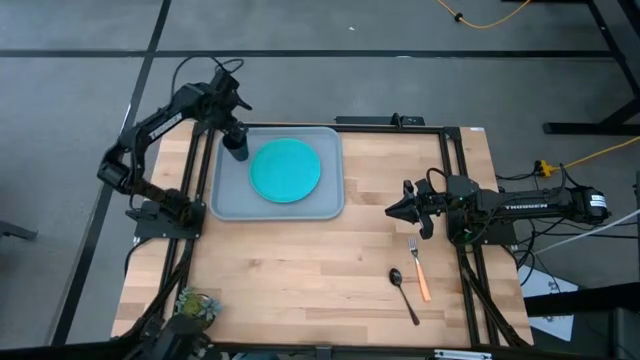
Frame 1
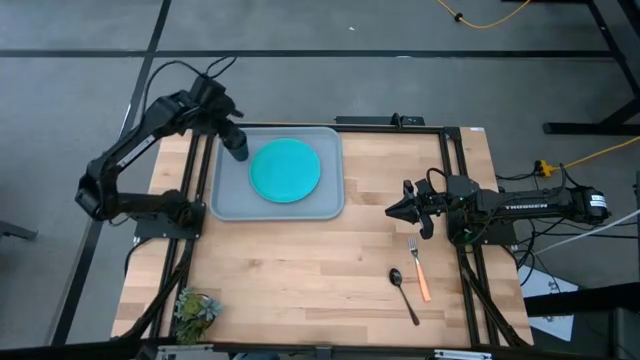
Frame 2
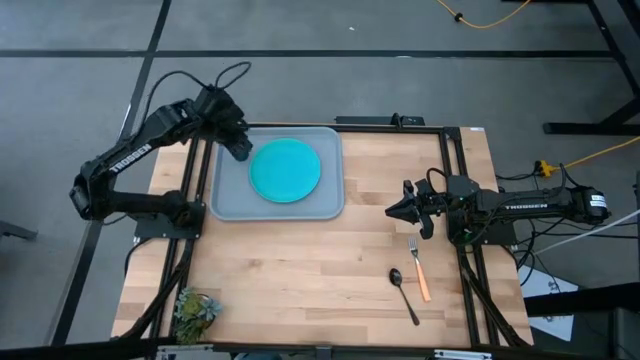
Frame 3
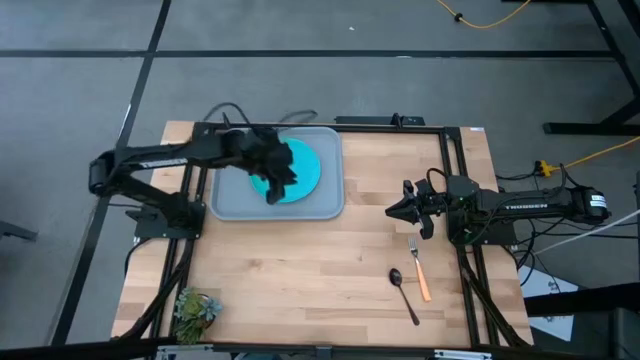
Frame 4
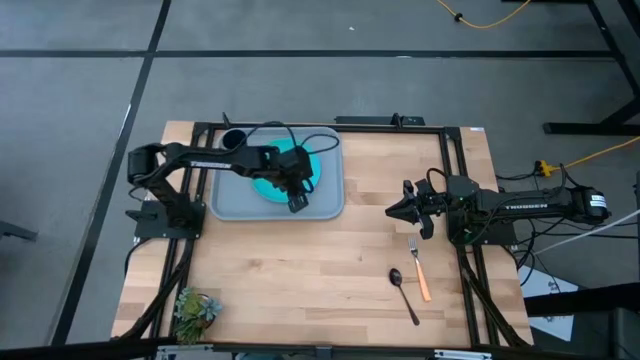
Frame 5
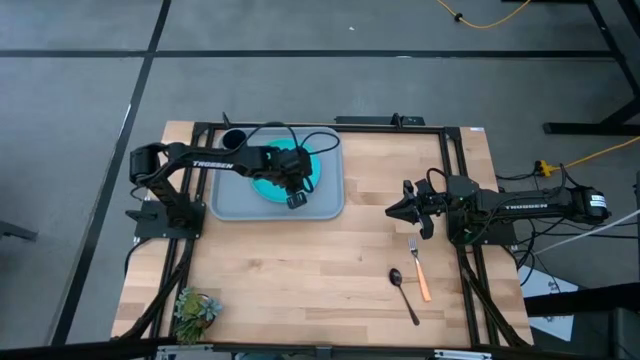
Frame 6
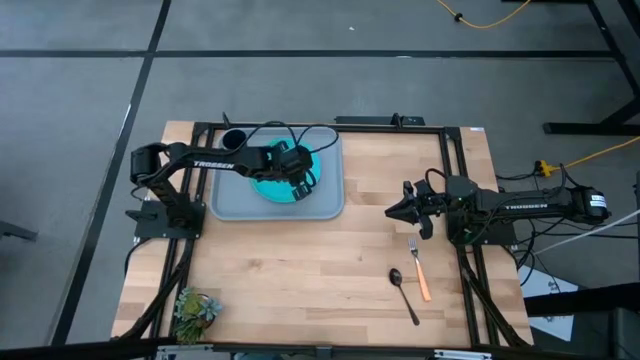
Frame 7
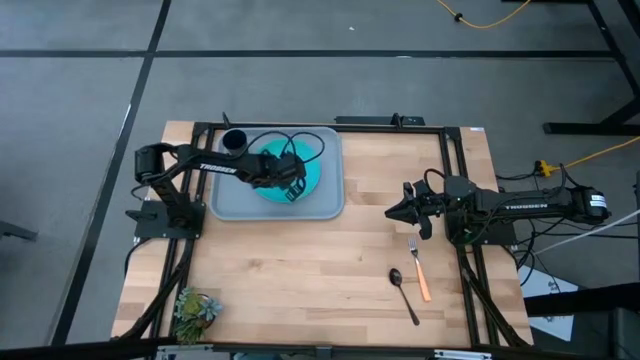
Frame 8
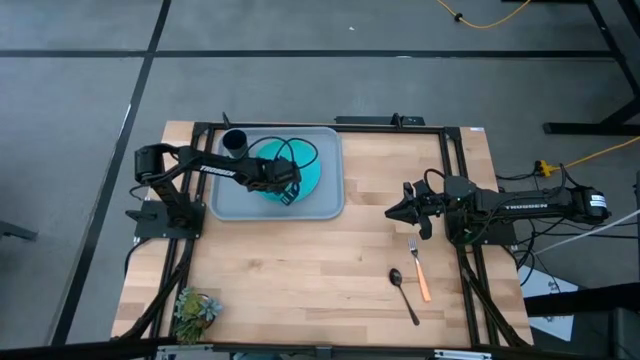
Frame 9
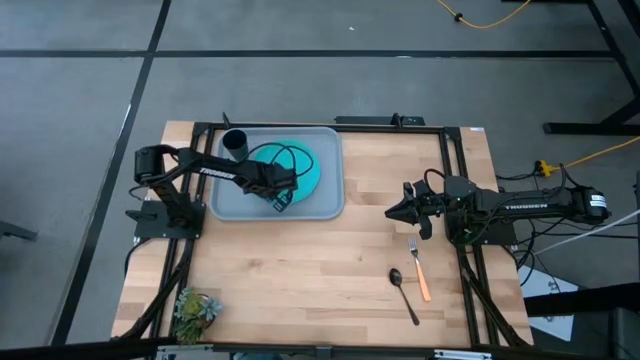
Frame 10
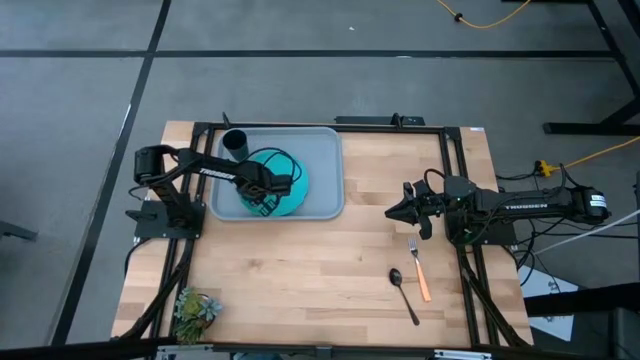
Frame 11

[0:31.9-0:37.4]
Task: Pick and place plate/cup/fork/spoon on tray
Adjust the light blue plate on the serving tray

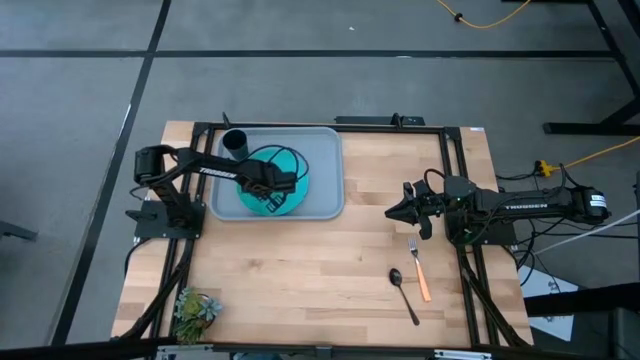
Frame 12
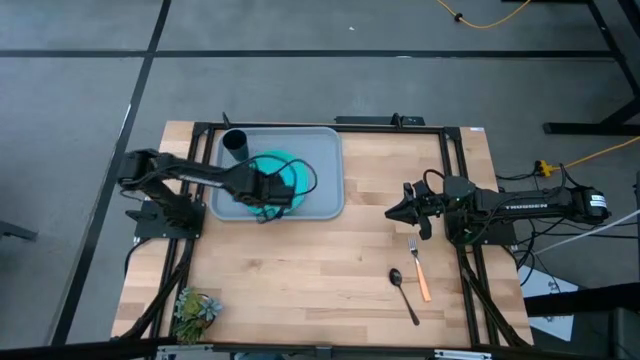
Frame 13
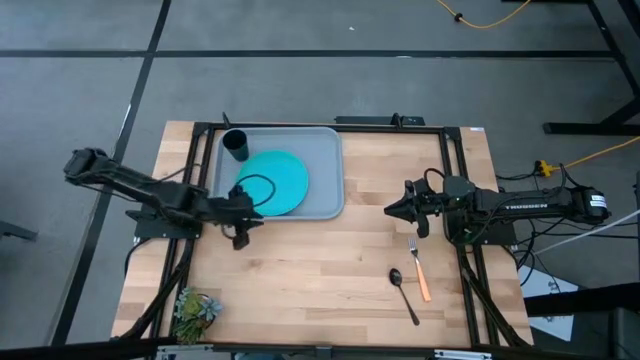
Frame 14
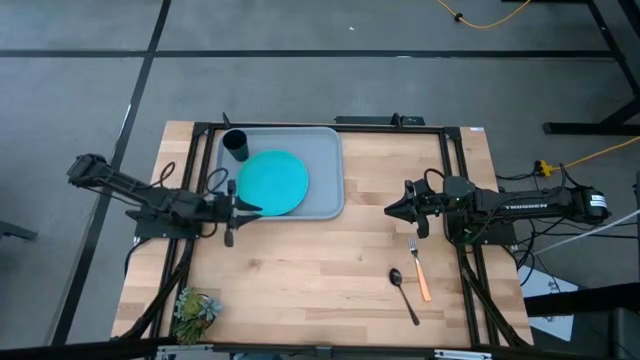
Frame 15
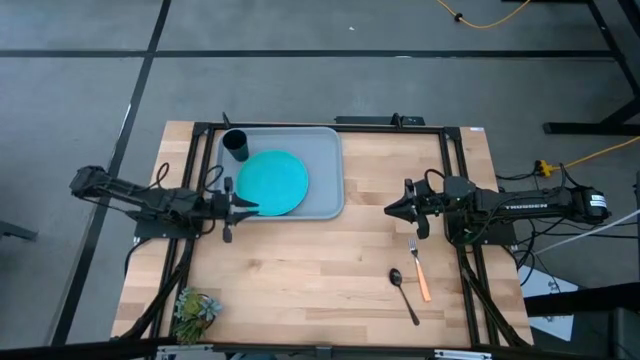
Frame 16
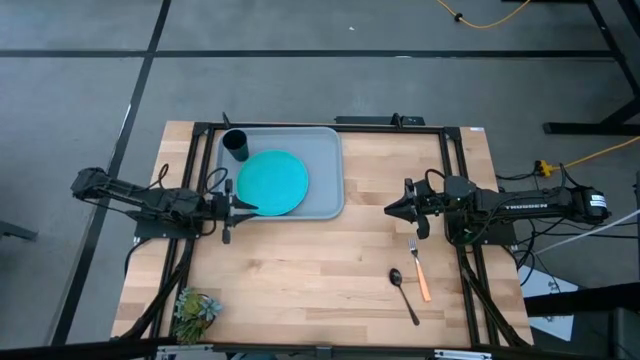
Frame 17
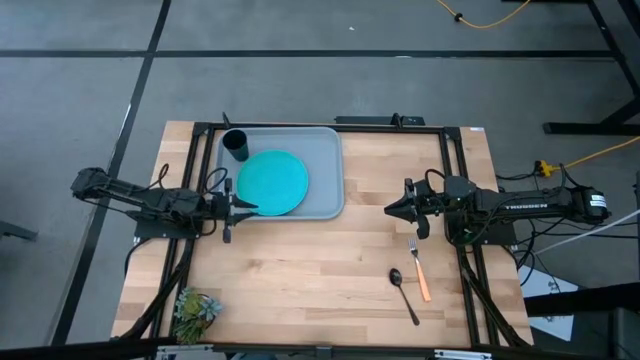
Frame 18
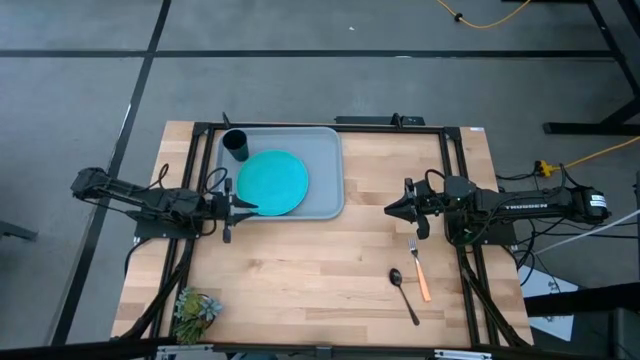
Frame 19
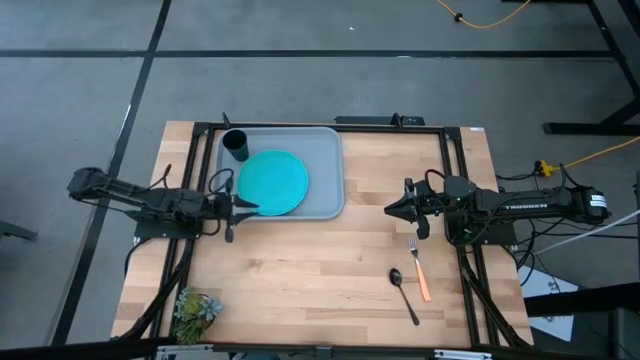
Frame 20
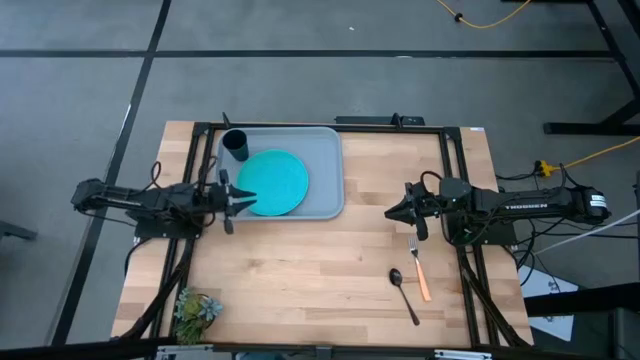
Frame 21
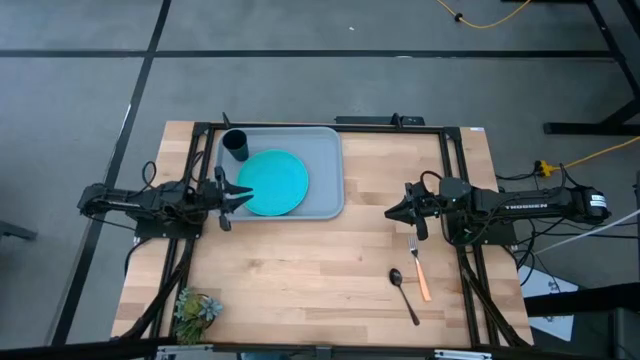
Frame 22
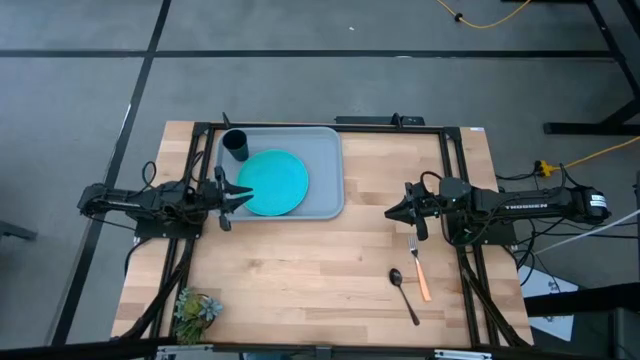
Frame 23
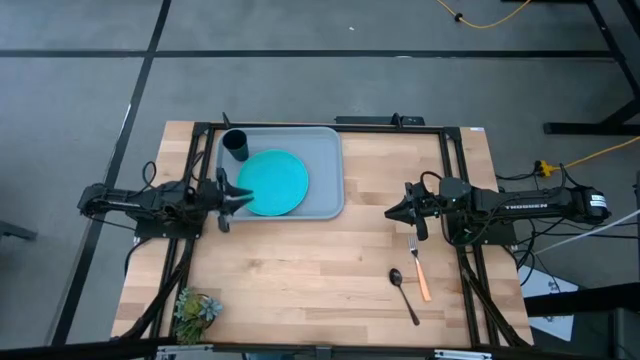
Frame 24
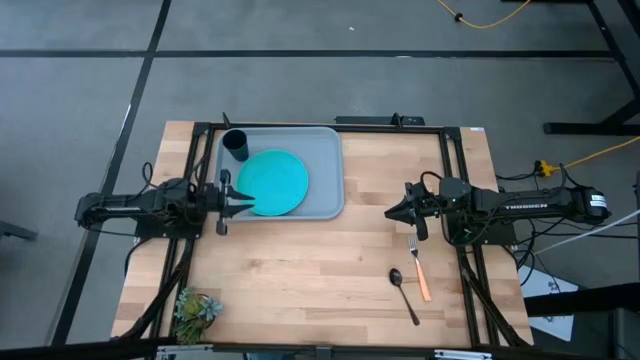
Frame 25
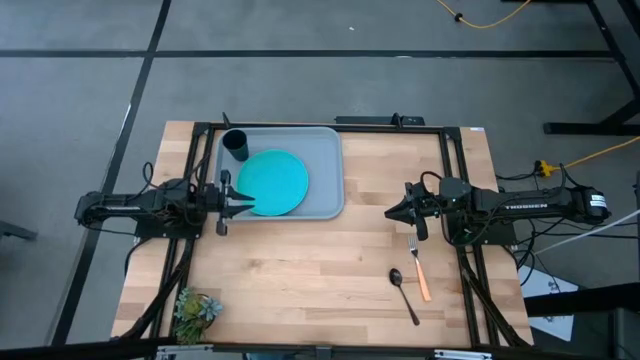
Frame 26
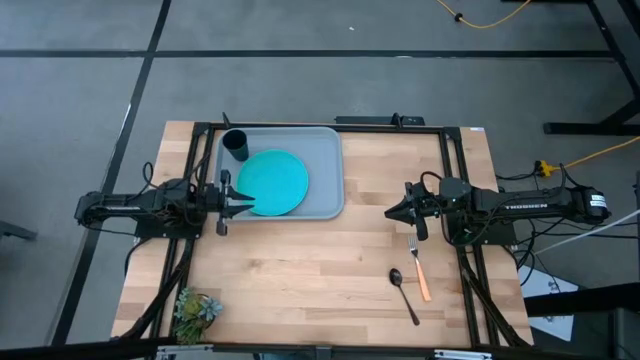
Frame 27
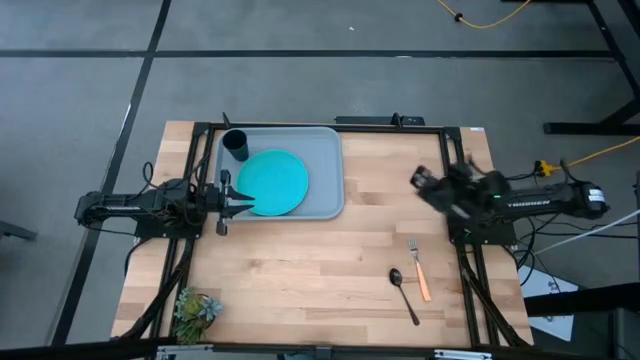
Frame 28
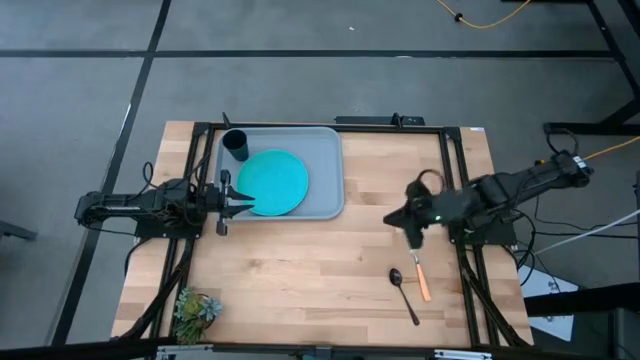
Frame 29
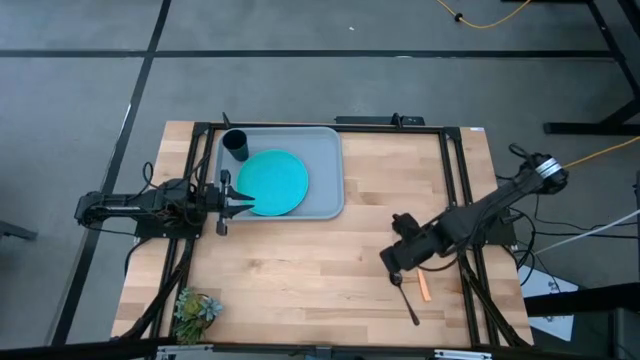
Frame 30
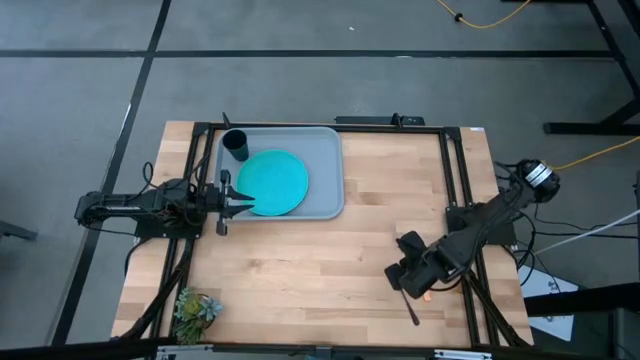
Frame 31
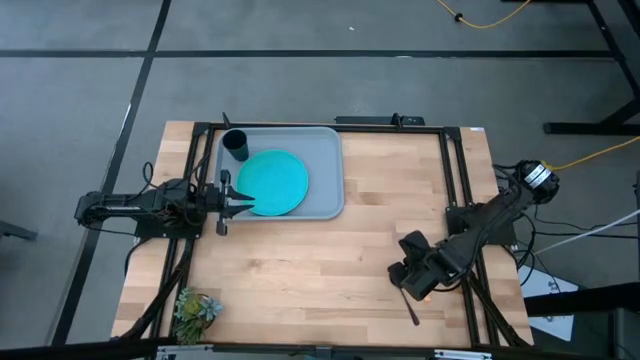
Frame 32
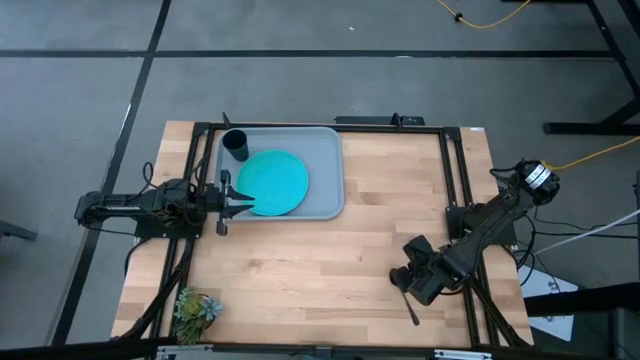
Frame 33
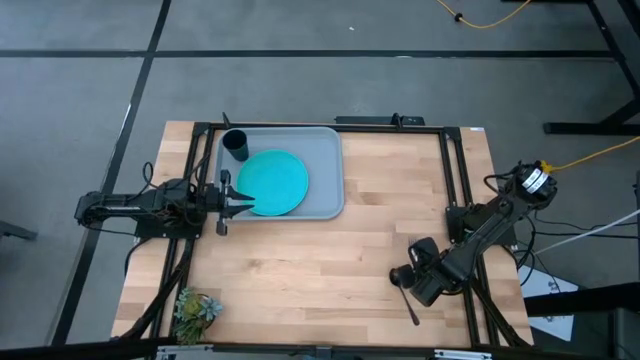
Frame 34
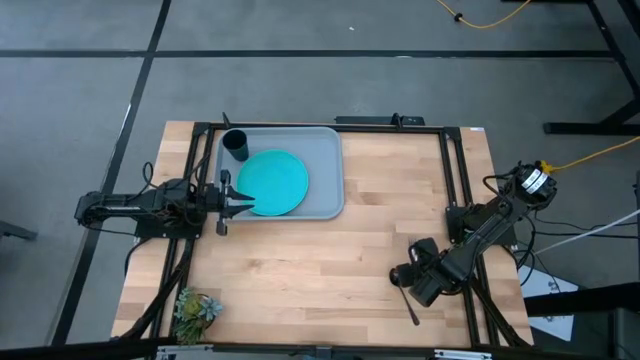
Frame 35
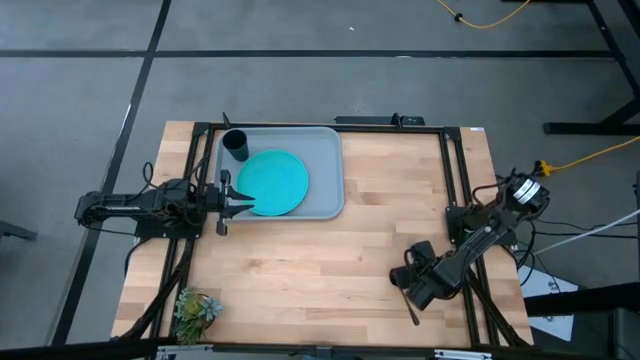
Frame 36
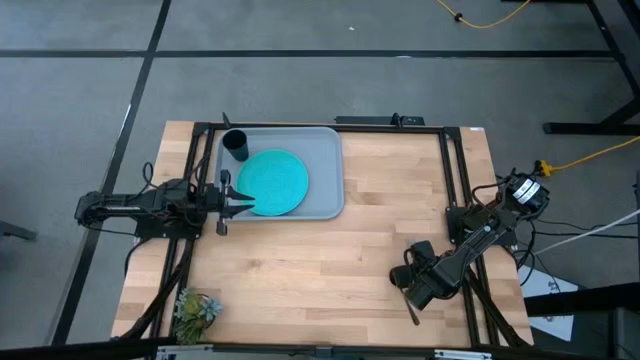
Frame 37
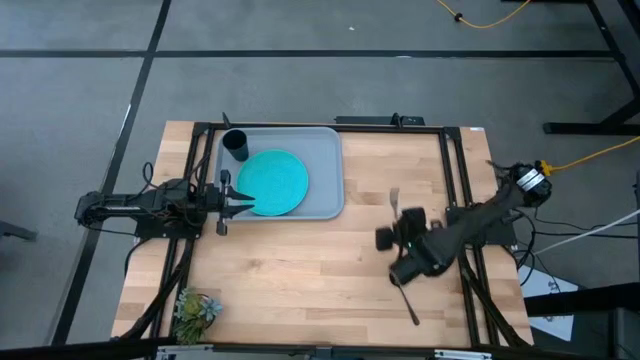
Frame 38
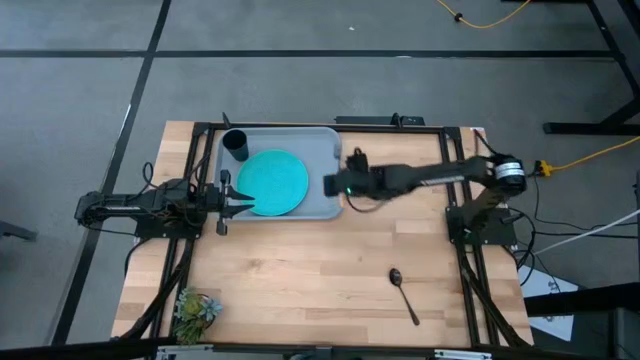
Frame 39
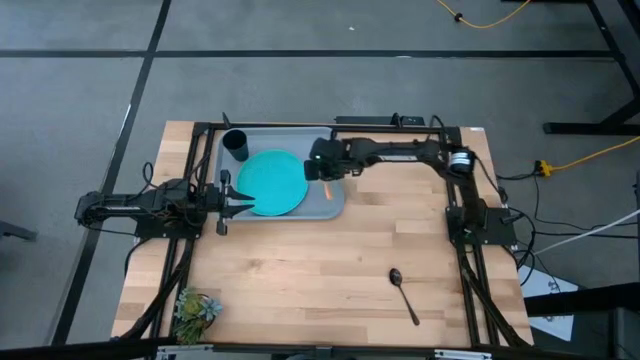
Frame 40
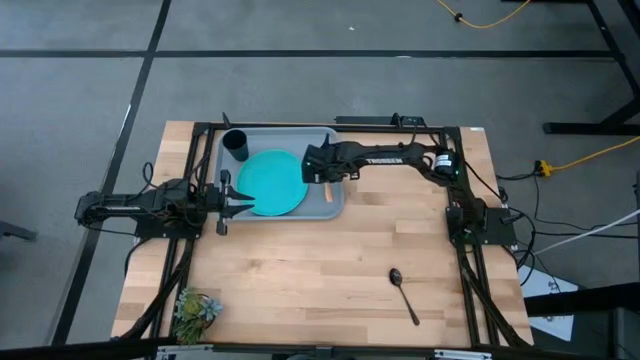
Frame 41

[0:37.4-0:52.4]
Put the yellow fork on the serving tray right beside the light blue plate
